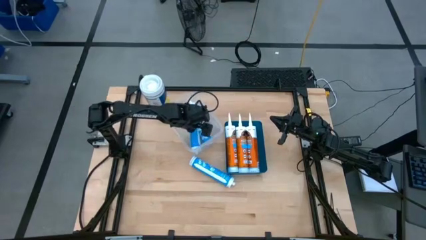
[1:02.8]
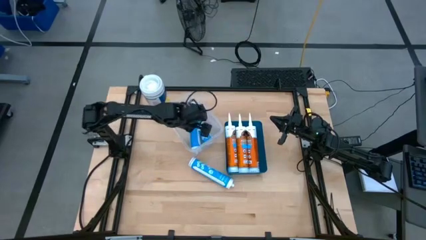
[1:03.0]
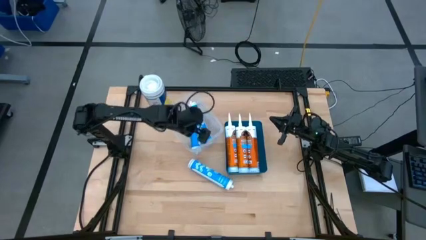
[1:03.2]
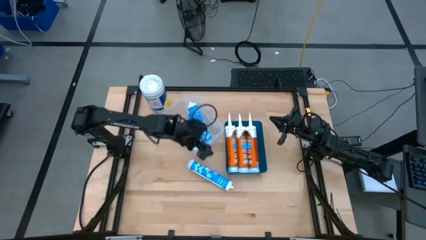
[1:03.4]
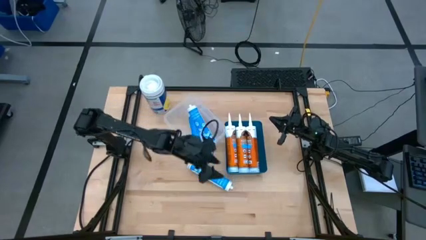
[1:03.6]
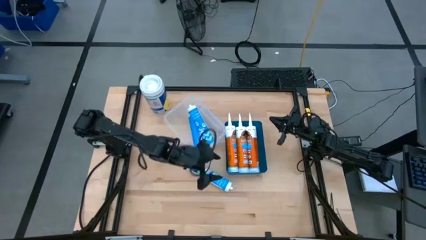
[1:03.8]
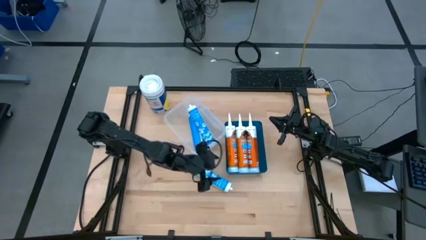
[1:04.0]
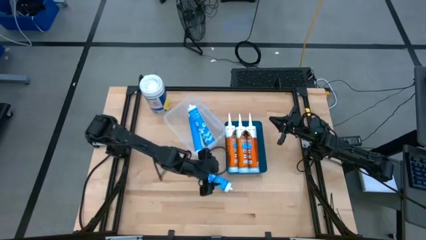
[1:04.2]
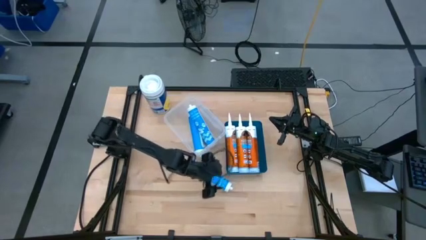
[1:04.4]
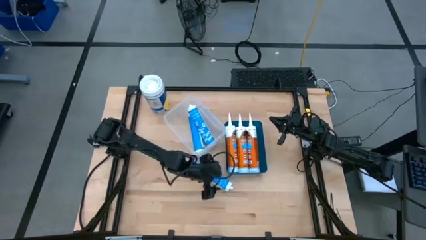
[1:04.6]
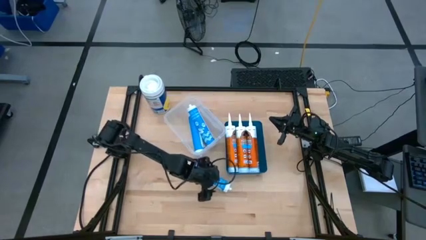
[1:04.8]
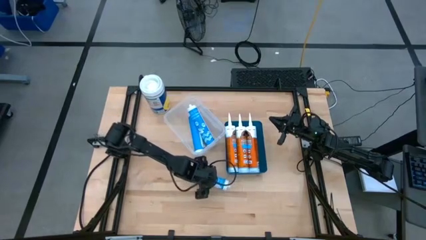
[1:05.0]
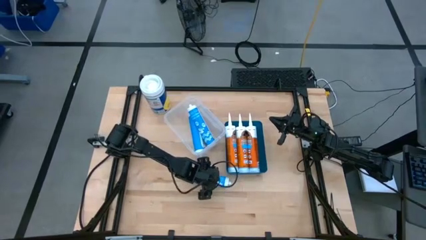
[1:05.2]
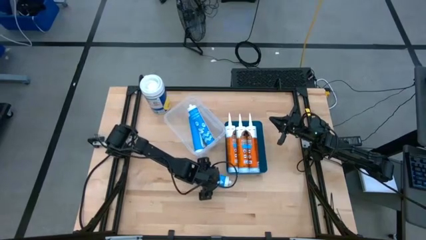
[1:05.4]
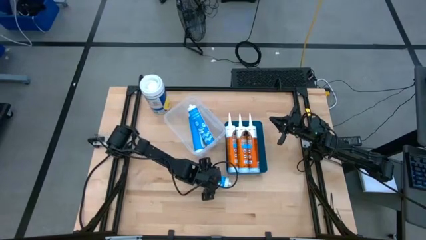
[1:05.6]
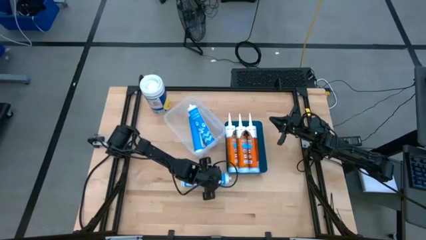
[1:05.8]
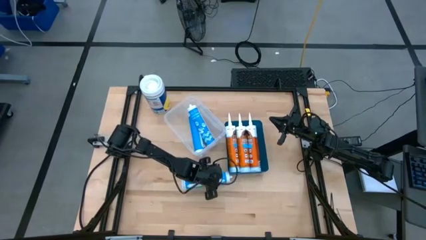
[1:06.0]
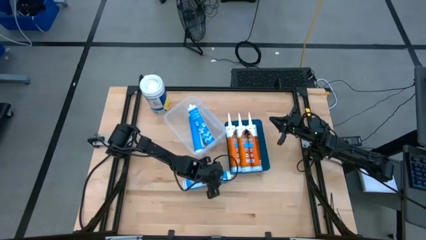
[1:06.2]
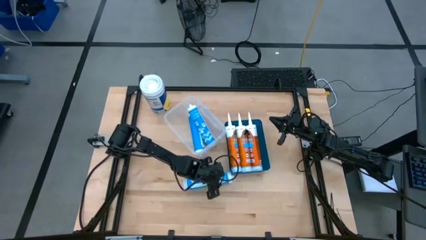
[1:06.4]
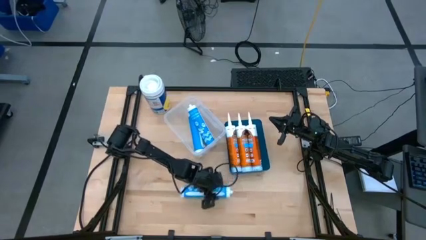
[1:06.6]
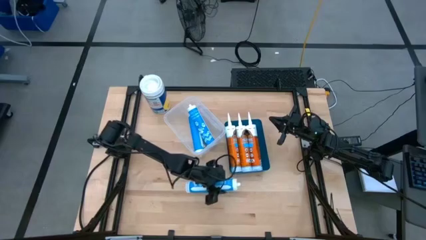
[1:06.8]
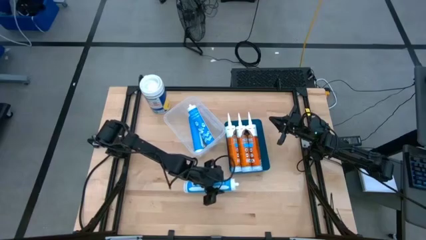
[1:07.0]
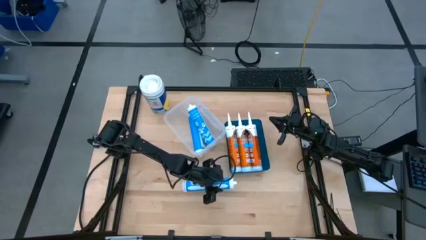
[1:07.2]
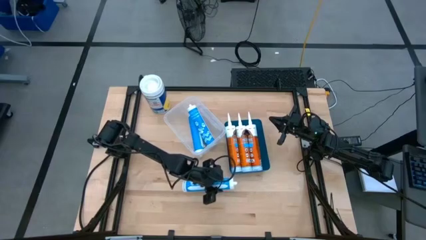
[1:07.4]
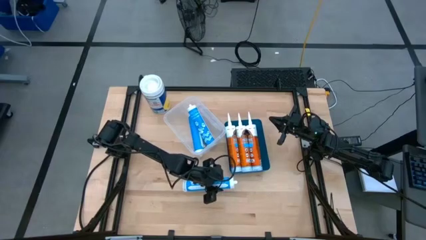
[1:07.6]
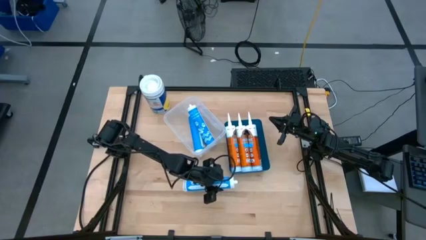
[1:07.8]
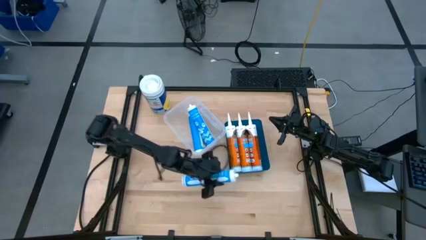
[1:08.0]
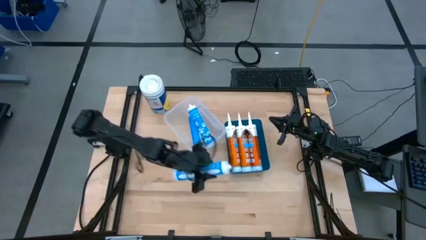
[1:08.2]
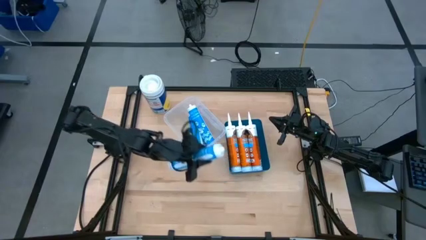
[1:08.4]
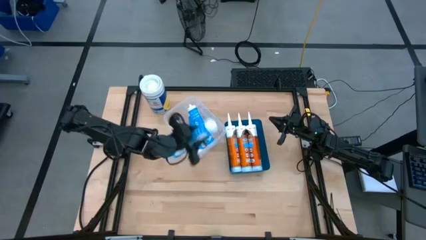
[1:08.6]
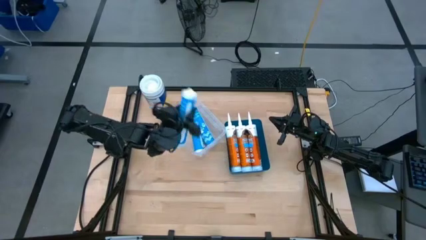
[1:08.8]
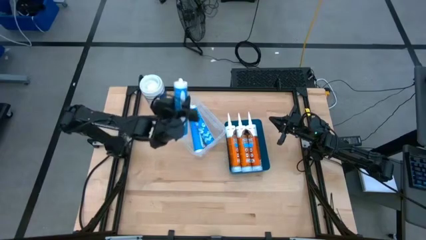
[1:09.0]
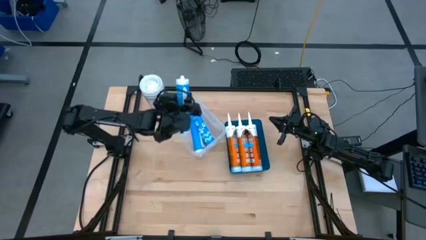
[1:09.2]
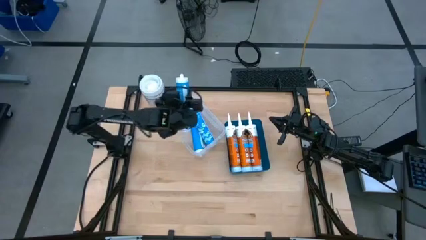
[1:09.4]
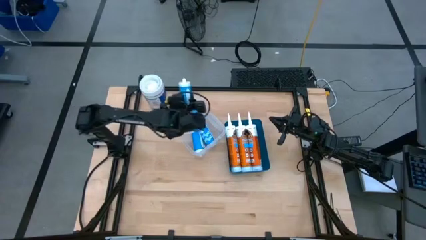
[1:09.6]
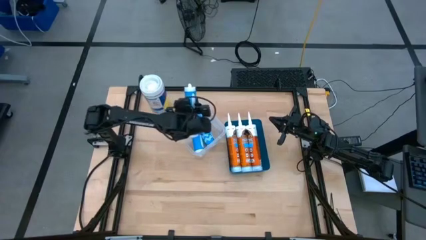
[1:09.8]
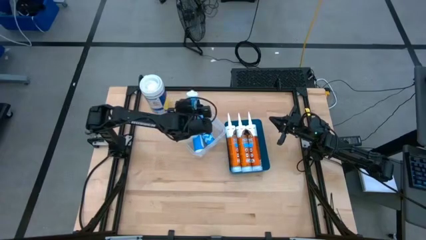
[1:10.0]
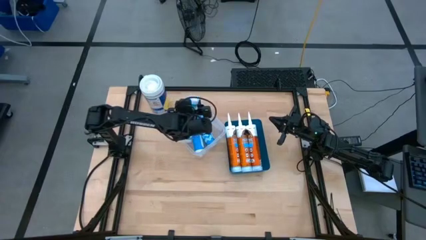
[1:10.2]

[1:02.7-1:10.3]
Task: Pick & place silicon tubes, Sealant and Lysol wipes
Put the blue sealant into the transparent bin

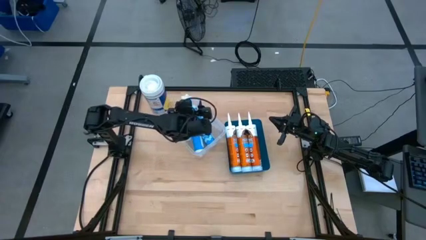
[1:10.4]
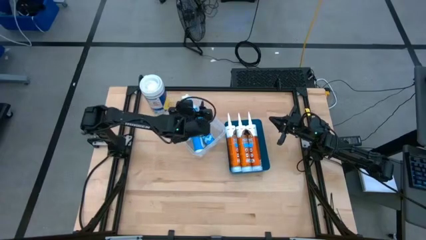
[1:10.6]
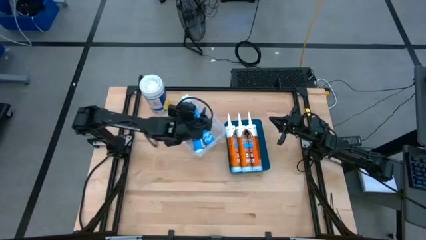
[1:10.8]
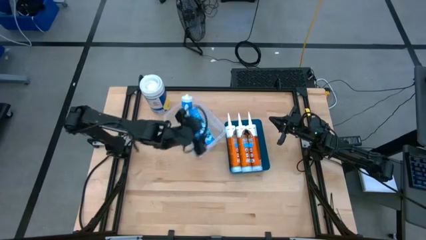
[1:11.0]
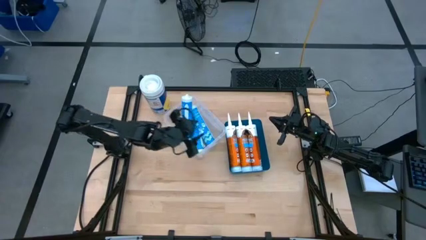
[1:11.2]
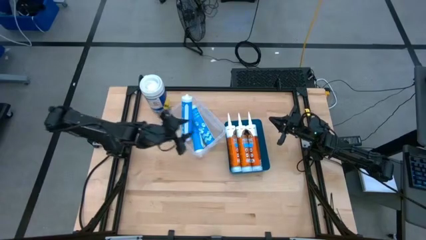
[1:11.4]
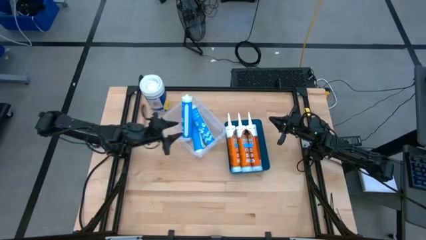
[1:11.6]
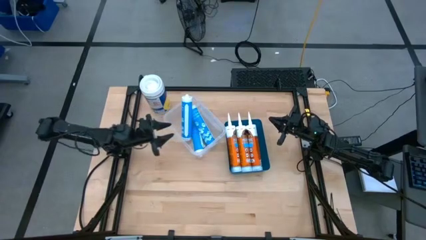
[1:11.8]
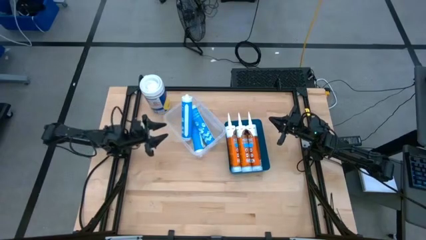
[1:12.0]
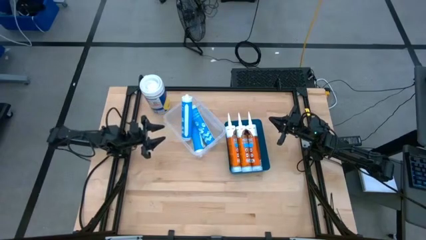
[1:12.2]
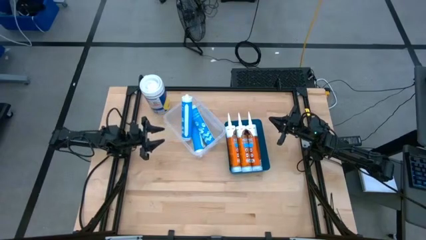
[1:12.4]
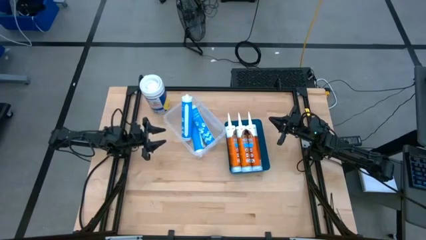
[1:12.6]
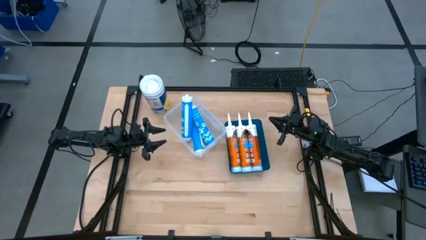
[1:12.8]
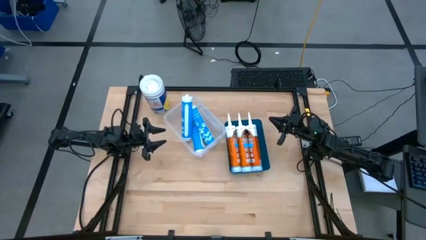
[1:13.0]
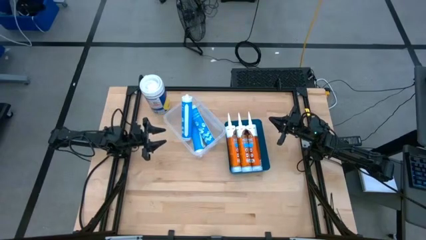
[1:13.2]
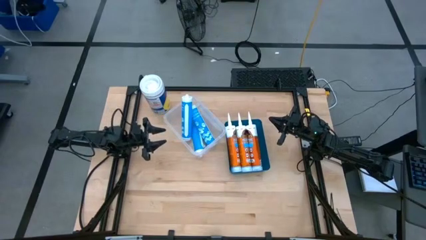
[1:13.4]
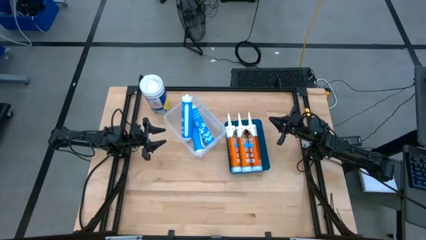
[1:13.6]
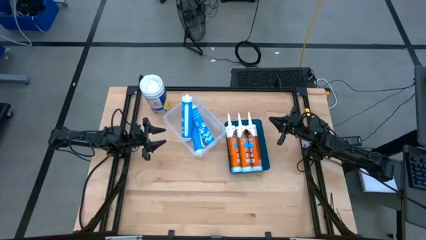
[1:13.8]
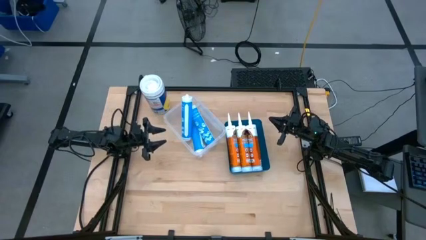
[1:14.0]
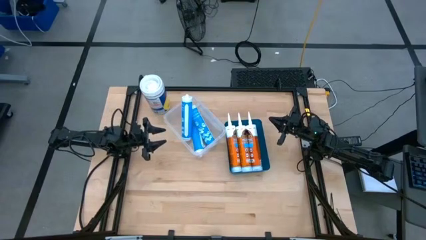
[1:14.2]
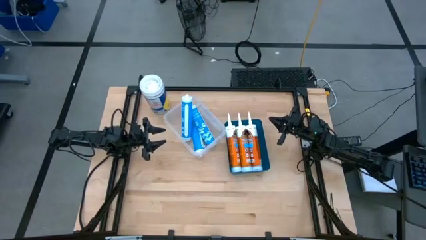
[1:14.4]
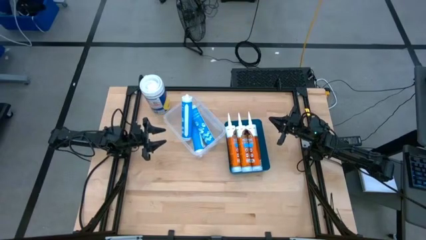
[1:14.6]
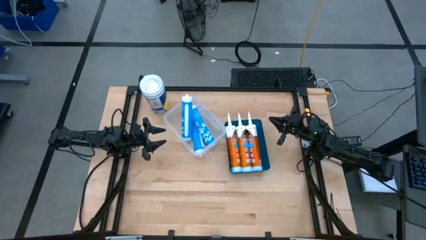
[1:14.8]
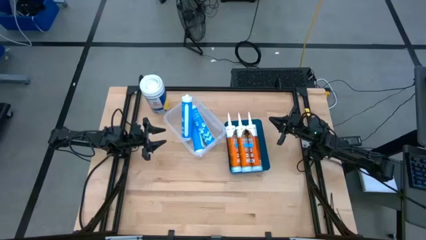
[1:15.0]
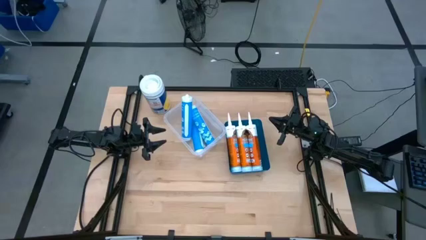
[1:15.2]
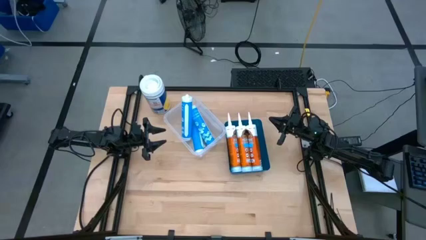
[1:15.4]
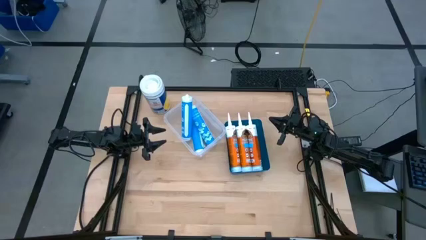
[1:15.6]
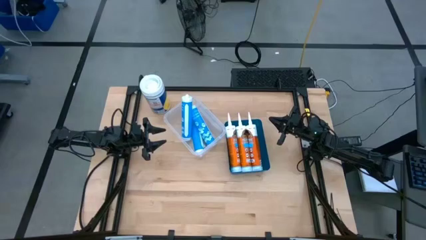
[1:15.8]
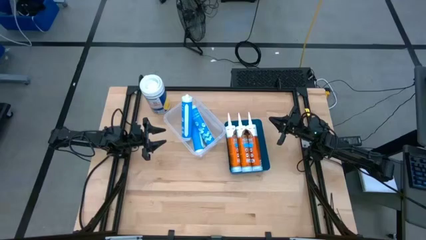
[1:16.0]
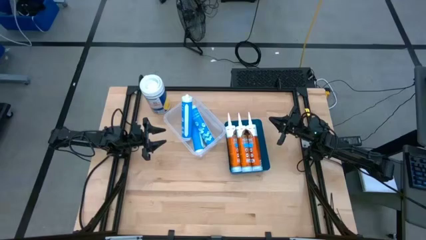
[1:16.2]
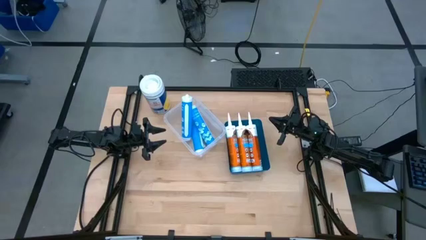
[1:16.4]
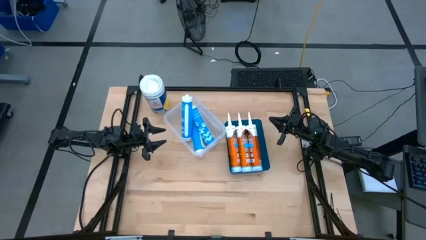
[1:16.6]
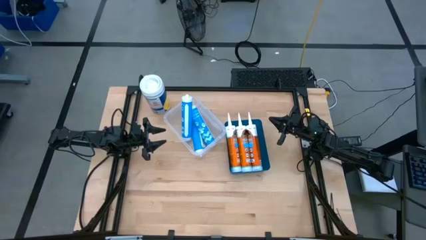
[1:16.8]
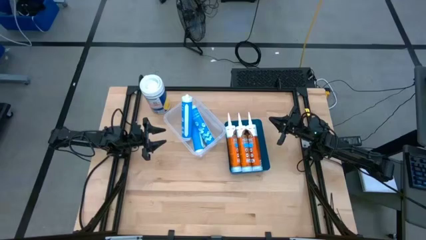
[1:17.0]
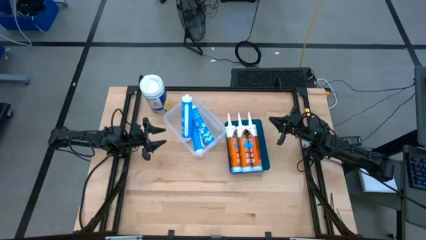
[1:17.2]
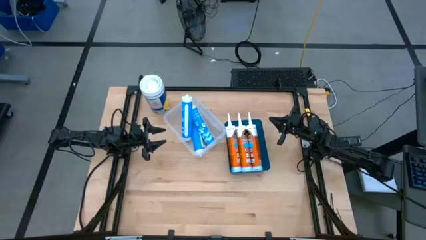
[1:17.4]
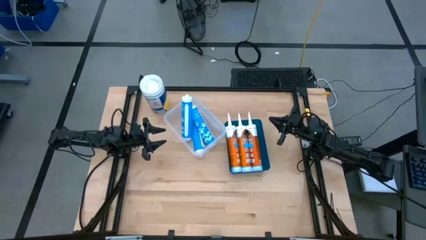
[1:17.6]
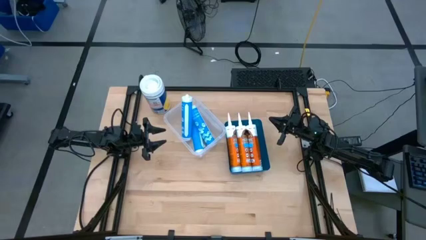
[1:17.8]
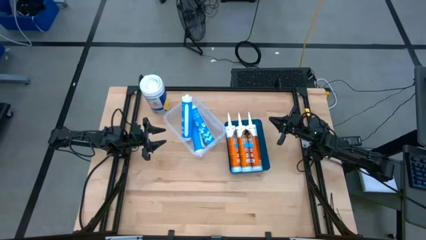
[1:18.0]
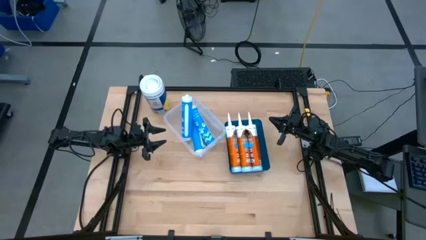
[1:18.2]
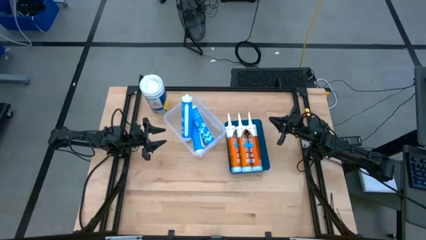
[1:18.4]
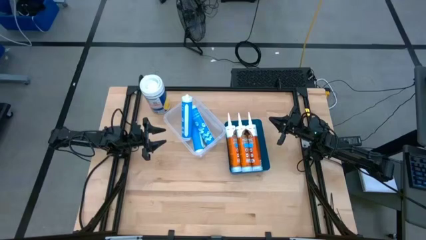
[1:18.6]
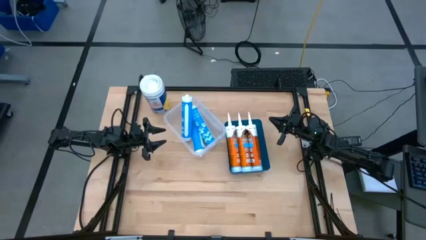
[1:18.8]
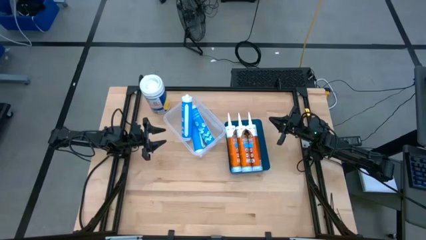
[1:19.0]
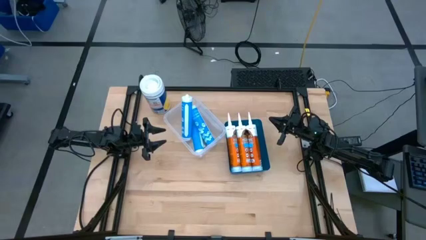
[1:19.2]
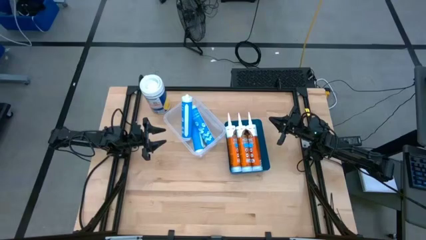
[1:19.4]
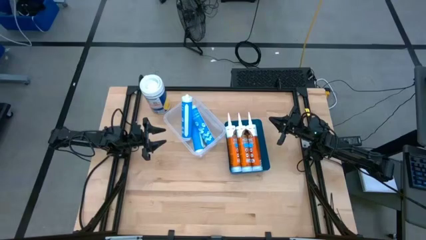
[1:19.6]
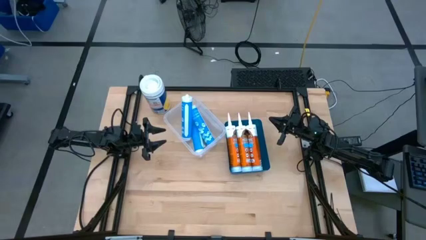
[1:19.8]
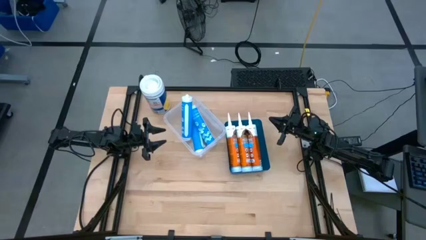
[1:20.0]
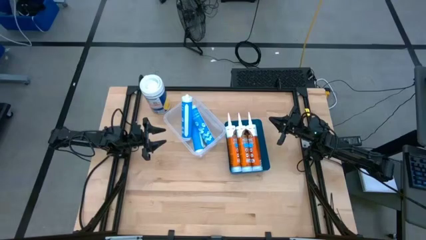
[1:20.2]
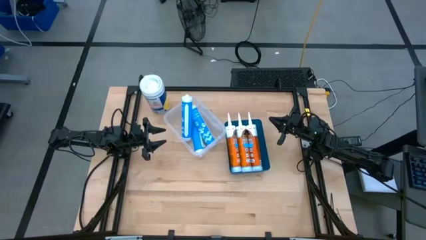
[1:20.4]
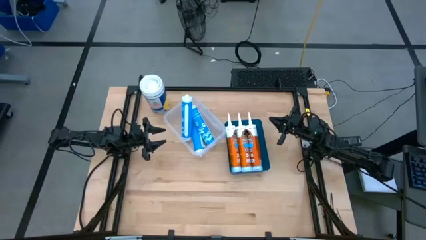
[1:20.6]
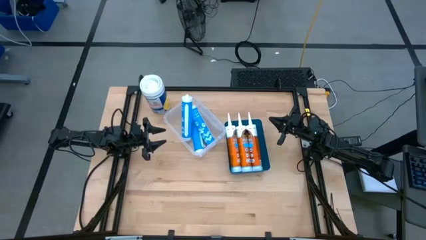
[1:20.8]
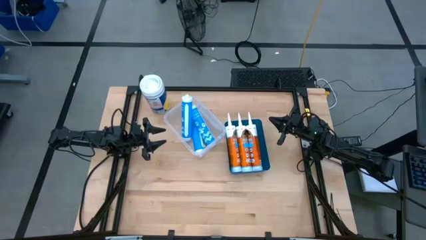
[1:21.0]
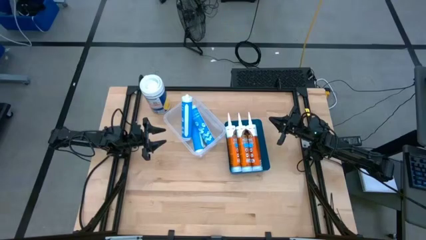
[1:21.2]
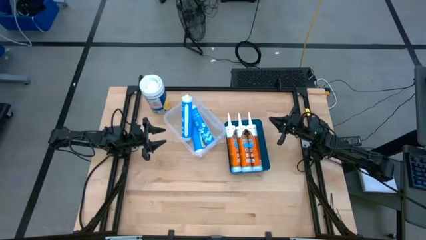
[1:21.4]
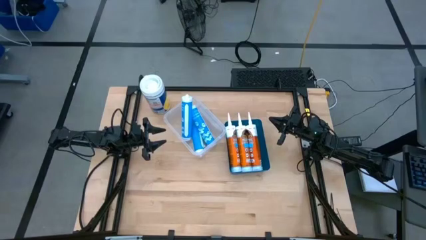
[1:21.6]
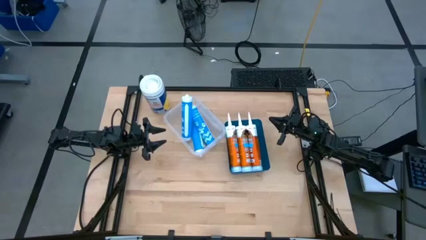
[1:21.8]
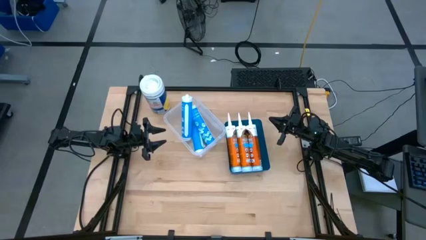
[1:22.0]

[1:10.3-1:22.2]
Return to Home Position
